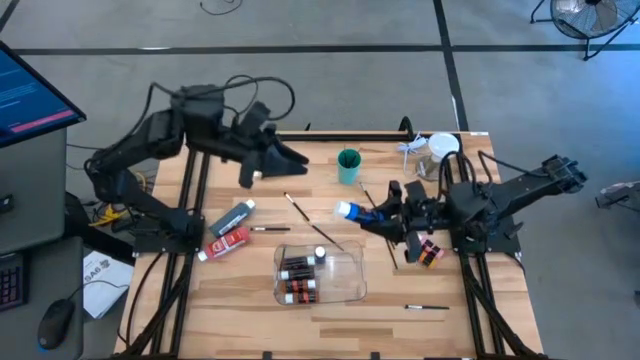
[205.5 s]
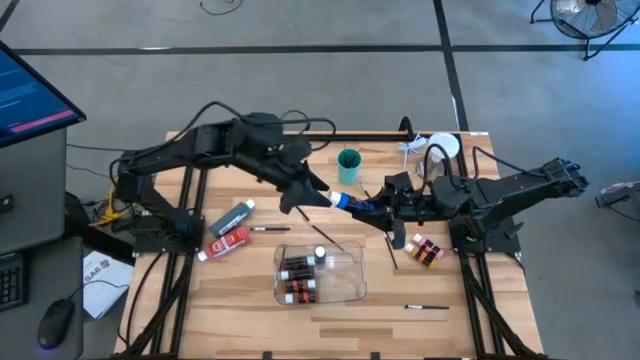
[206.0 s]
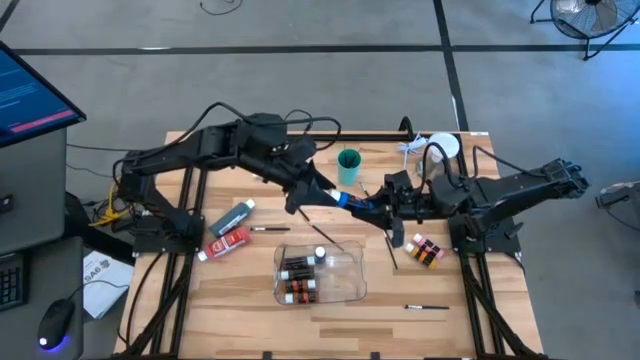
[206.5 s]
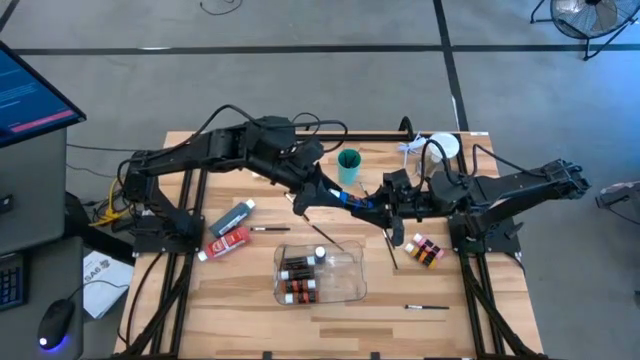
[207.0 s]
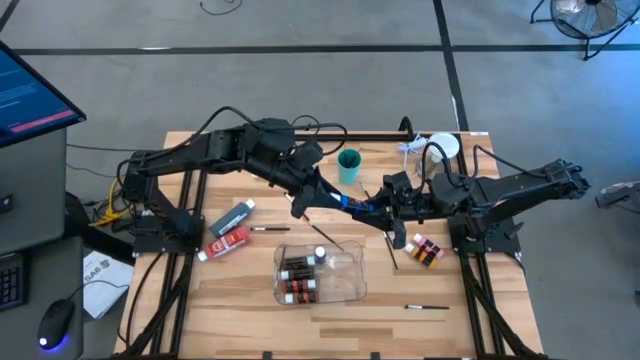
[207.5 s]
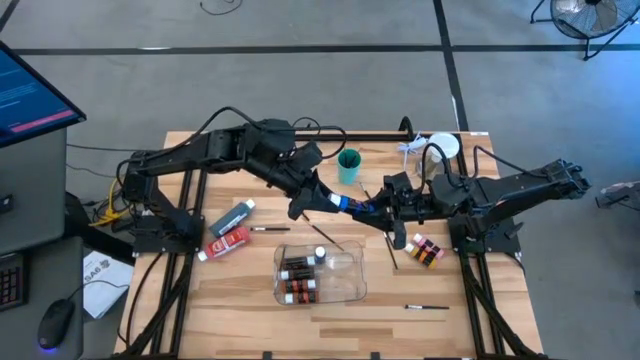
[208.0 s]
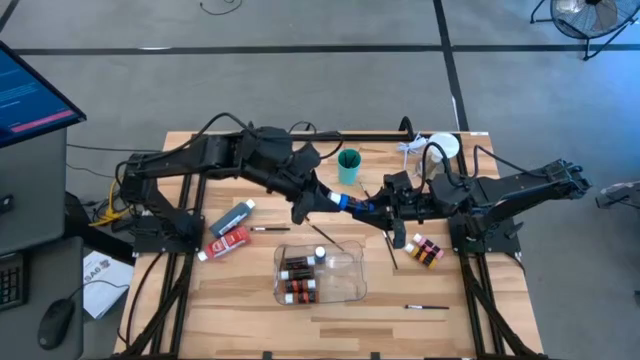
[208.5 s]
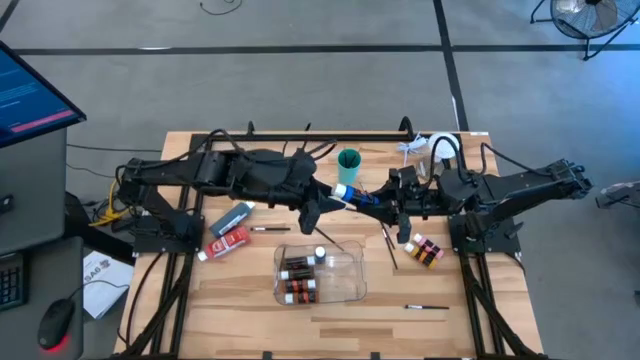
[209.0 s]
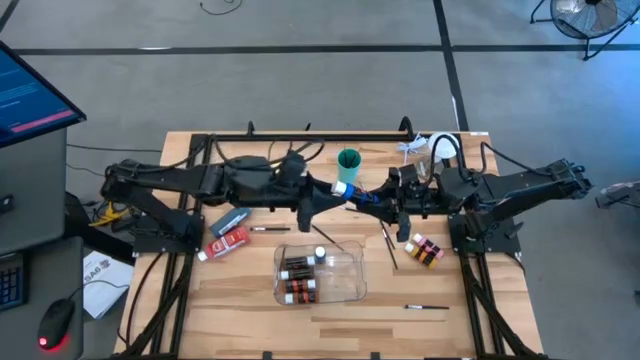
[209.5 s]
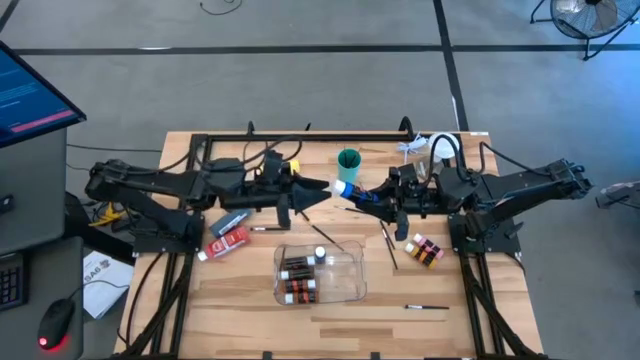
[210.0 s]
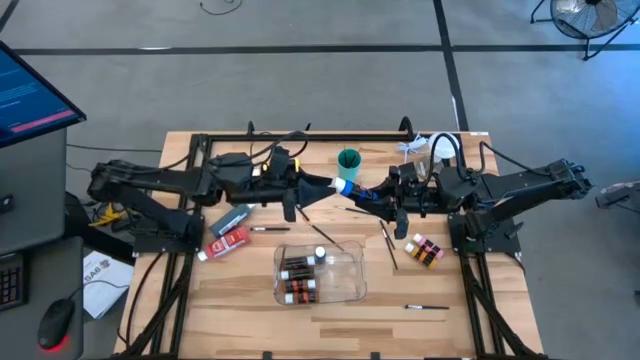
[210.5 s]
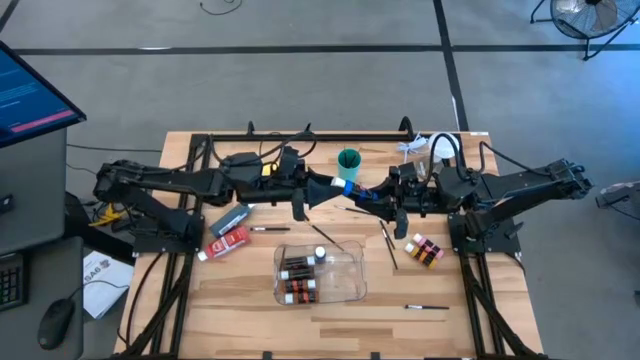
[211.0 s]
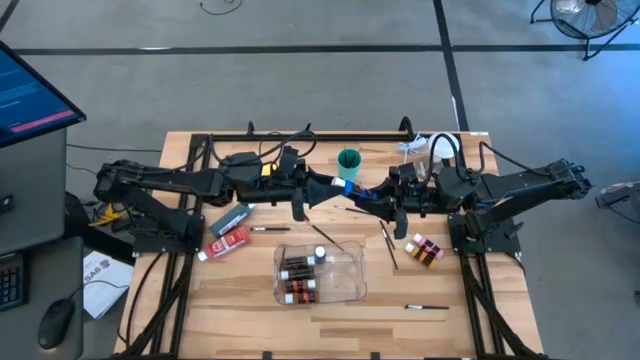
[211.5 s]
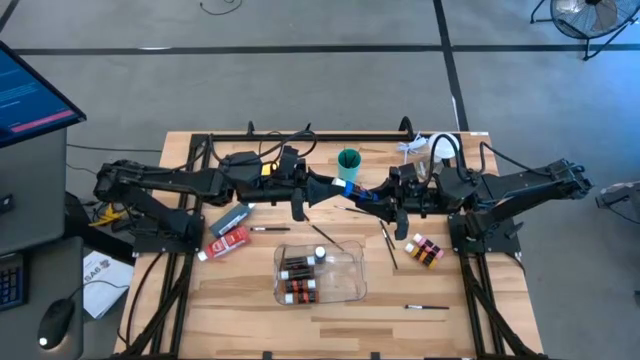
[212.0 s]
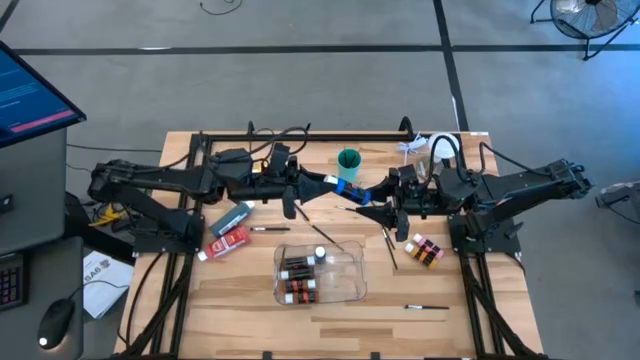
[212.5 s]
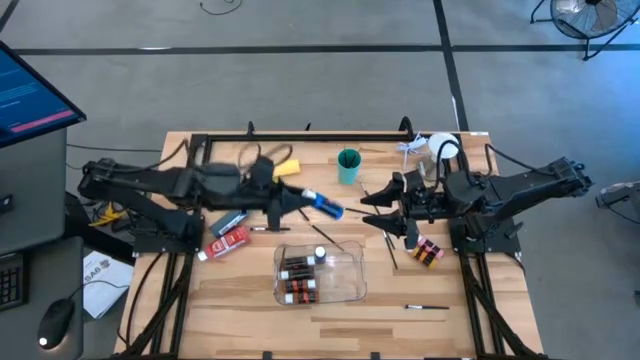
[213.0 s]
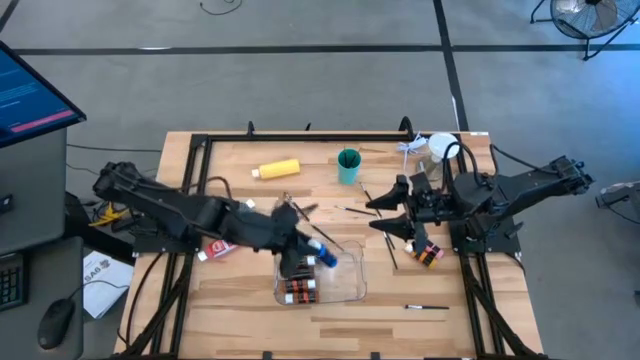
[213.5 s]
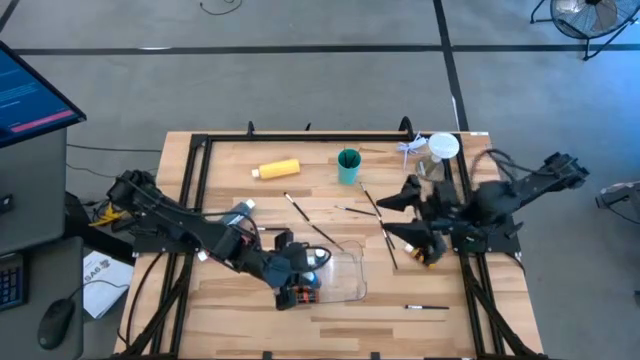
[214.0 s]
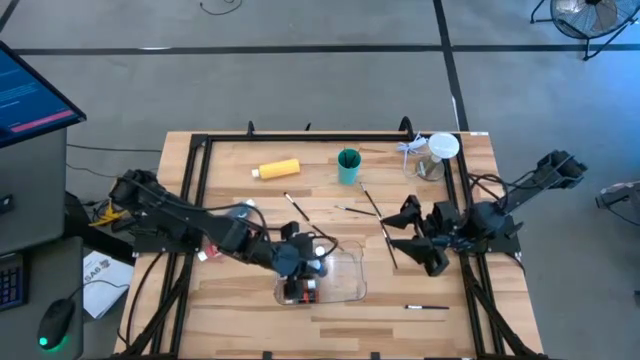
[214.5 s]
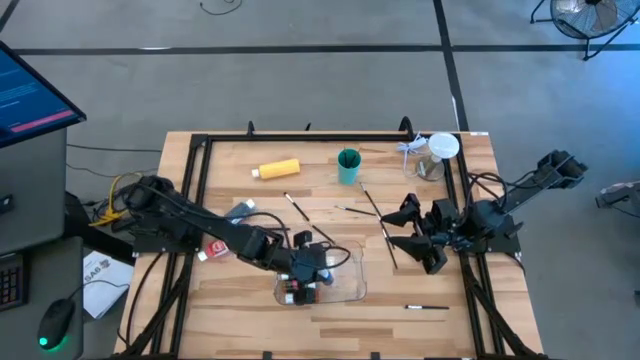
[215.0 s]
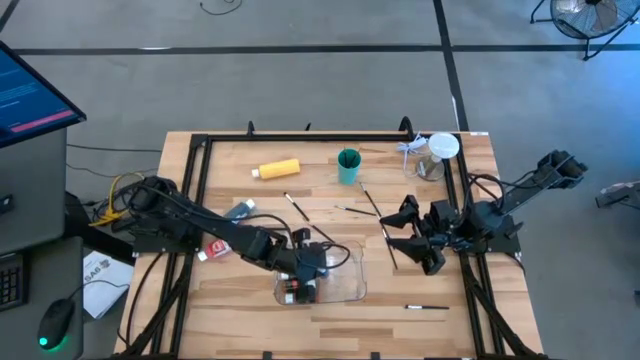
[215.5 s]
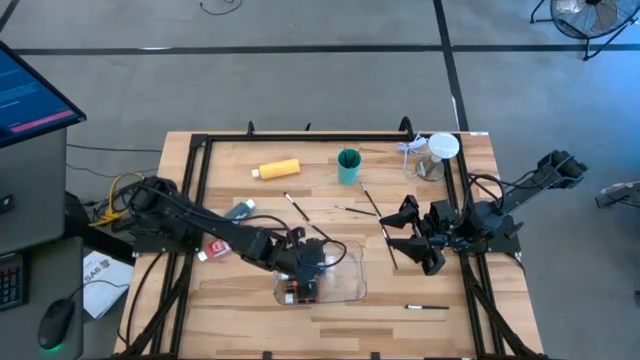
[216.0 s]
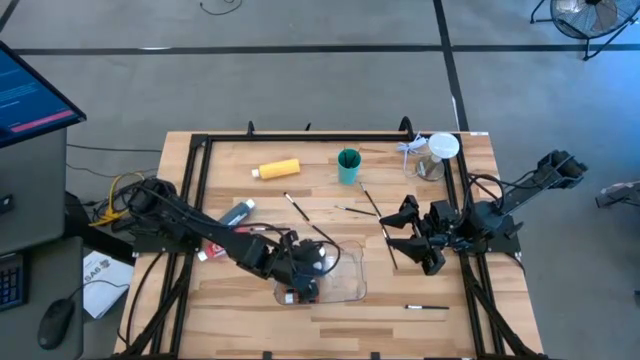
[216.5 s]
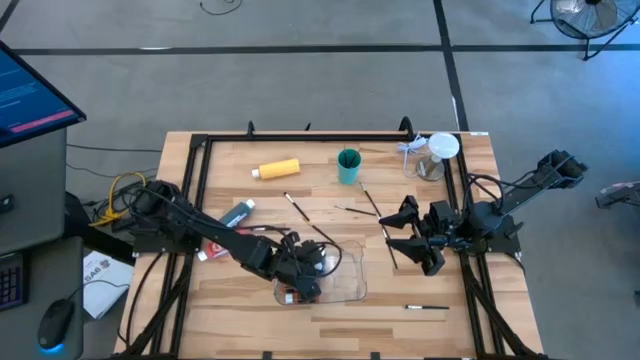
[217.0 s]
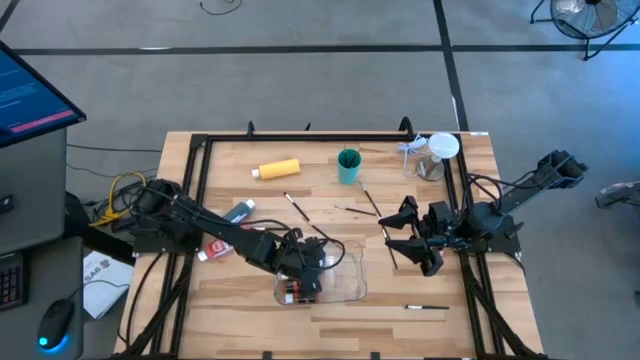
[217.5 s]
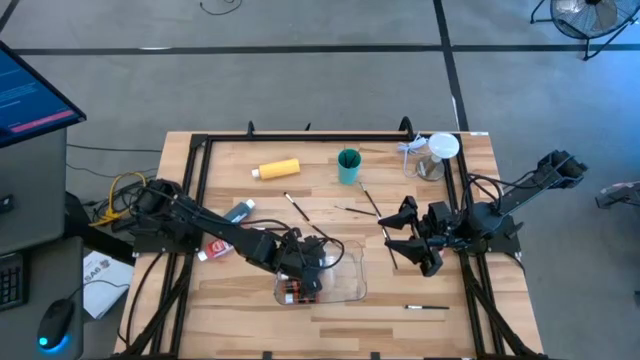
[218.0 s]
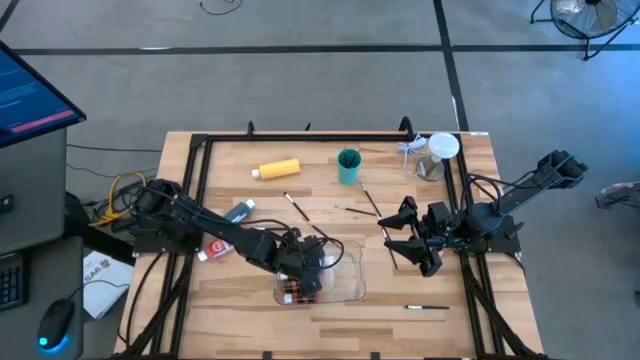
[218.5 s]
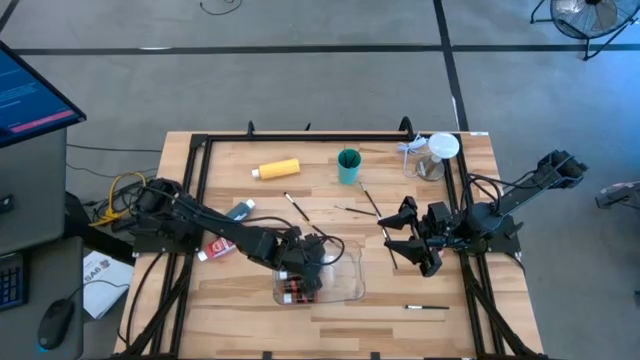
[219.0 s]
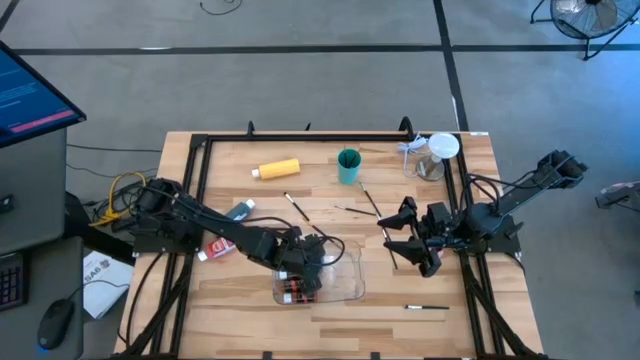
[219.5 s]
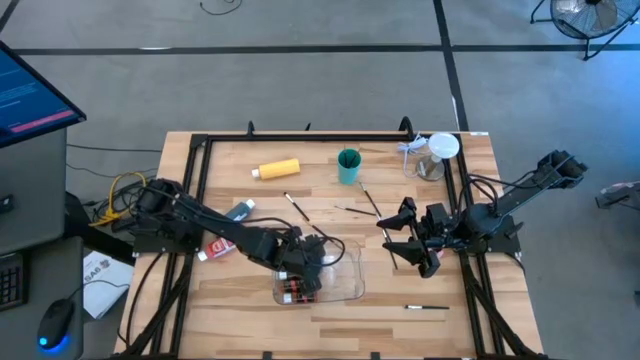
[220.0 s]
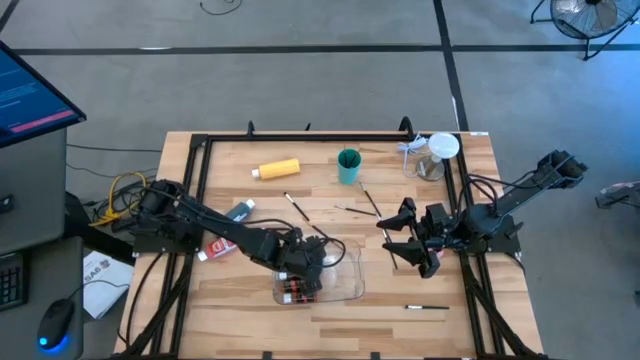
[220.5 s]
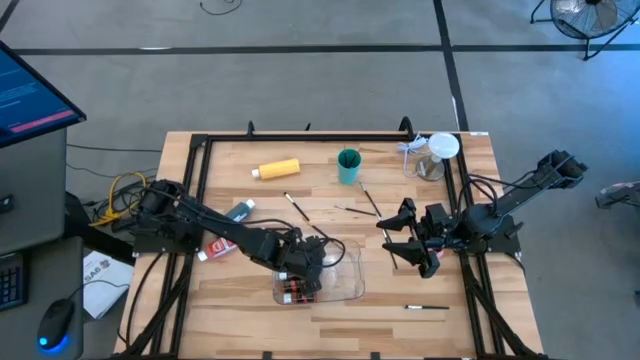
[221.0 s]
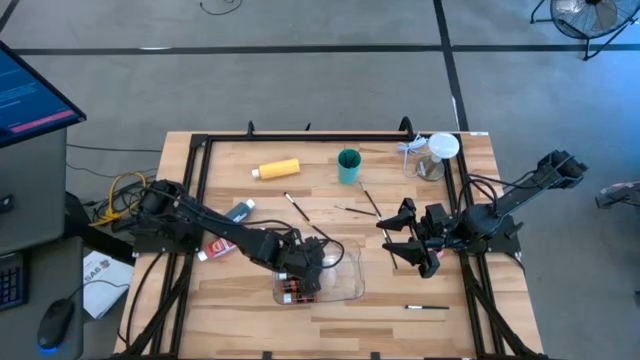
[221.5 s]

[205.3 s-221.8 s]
Task: Pick & Place Paint Supplies
Put the blue paint bottle into the transparent bin

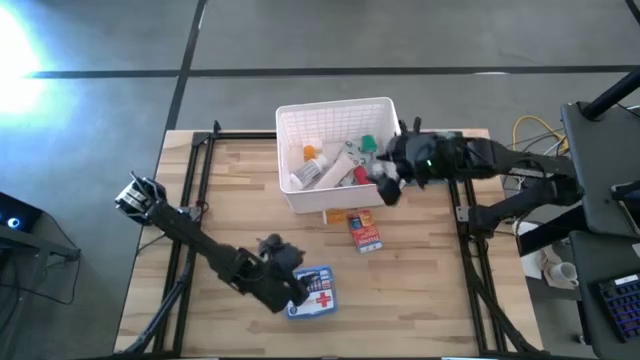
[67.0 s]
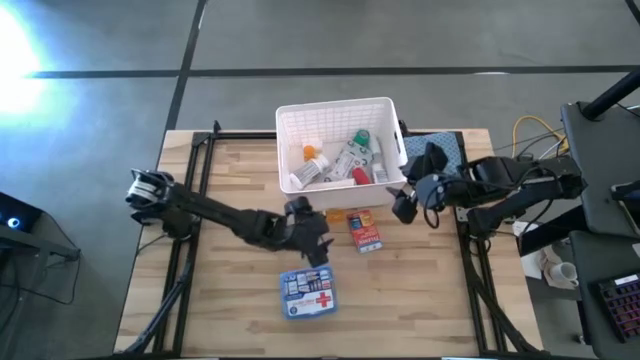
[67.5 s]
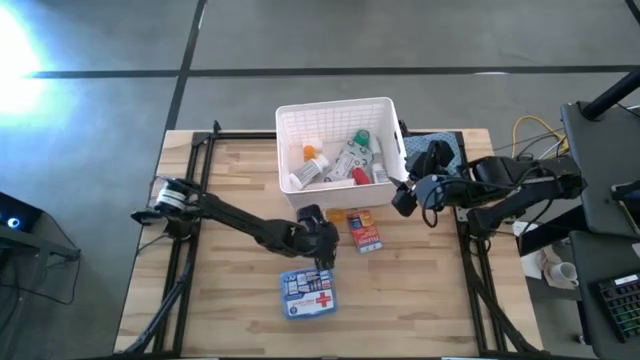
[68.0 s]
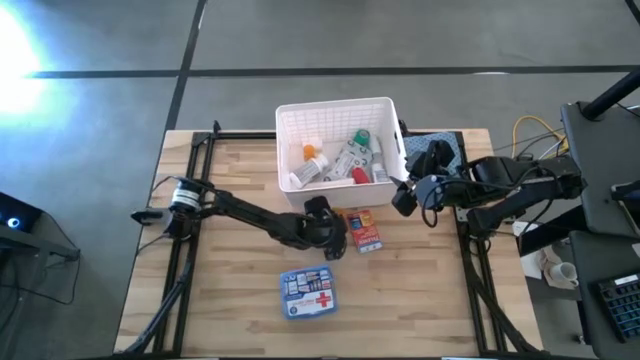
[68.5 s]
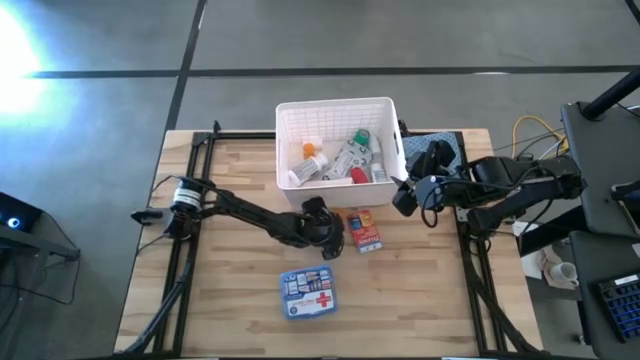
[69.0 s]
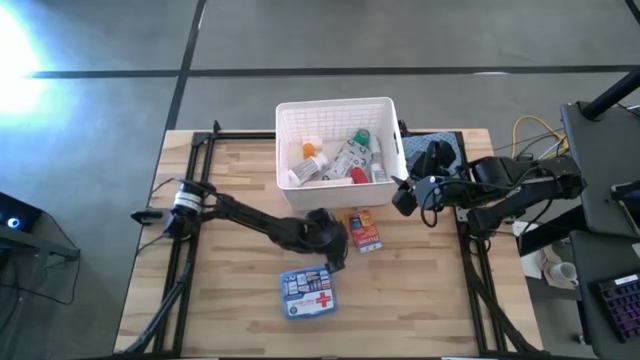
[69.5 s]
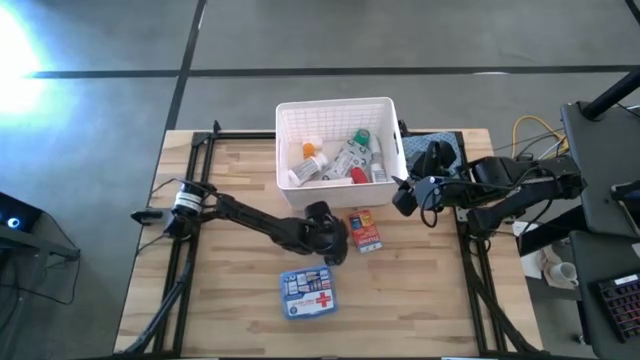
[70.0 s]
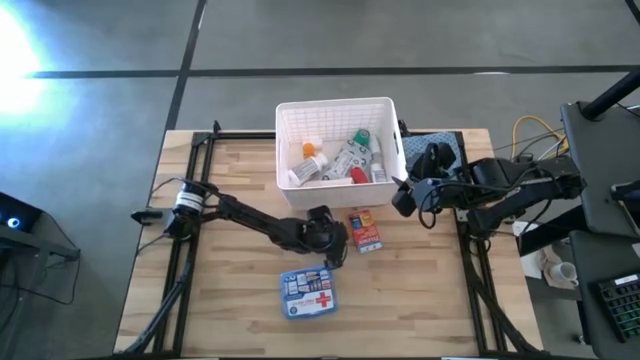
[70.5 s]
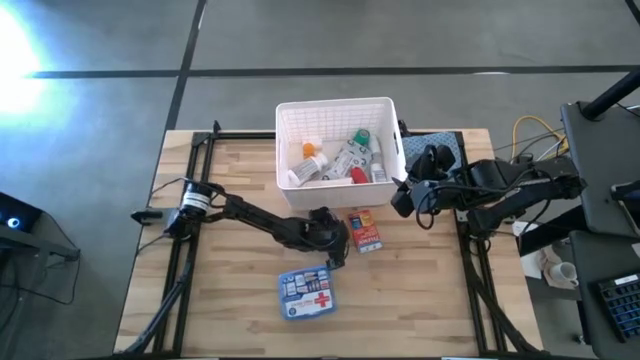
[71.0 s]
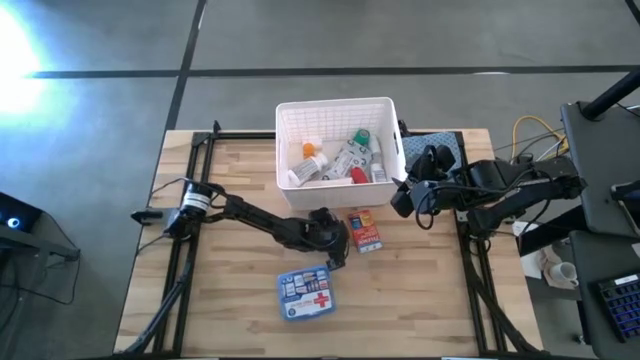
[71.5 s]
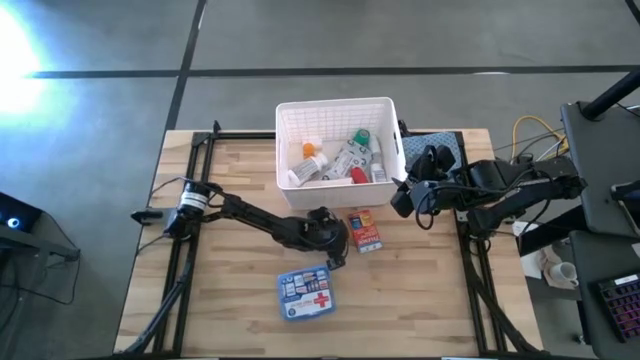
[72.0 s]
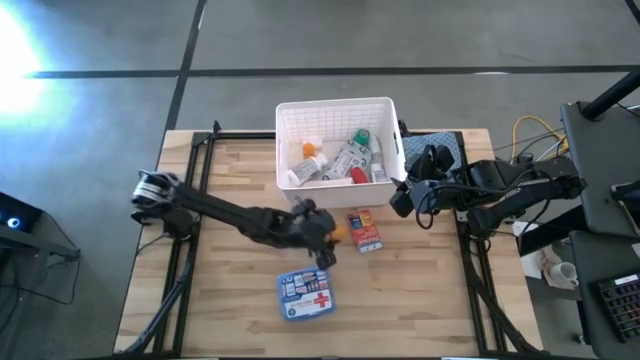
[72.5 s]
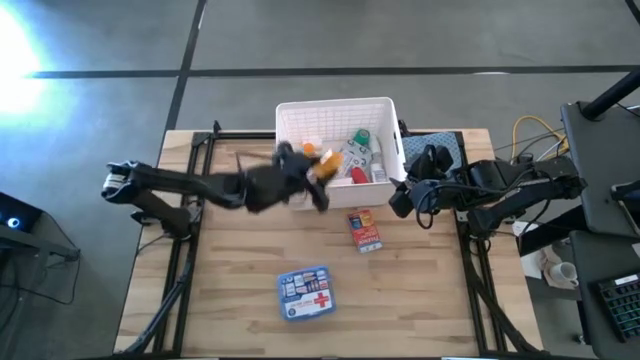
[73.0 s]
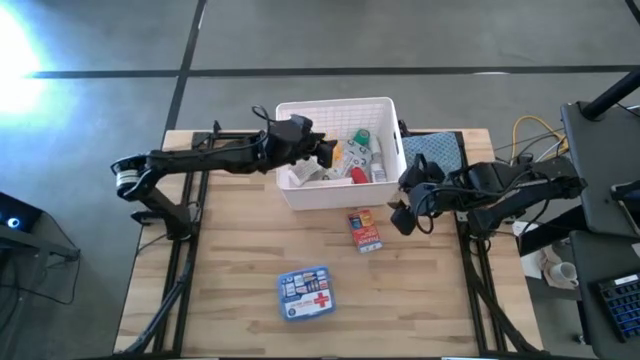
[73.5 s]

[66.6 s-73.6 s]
Task: Pick & place medical supplies in basket/bin
Put the orange pill bottle into the white container
